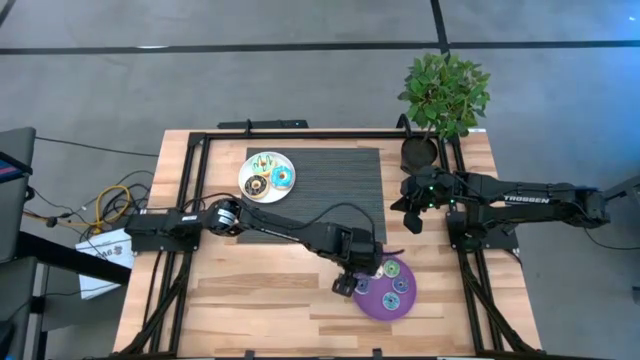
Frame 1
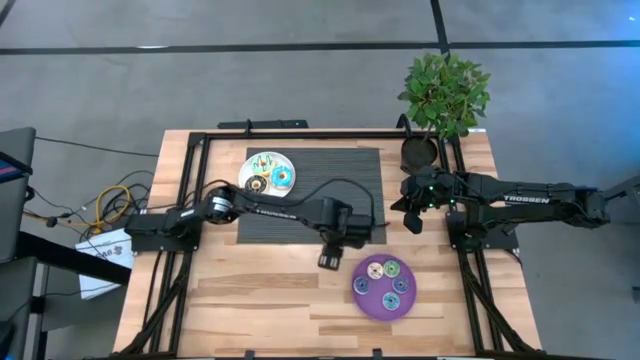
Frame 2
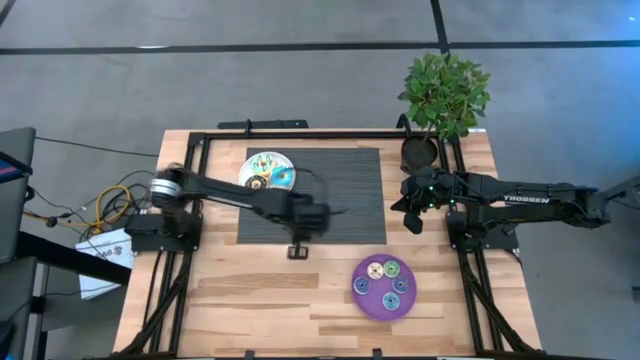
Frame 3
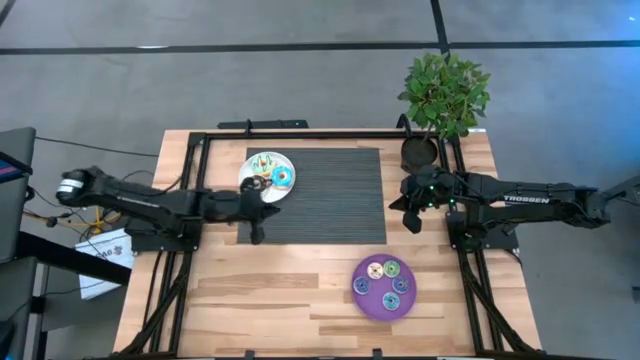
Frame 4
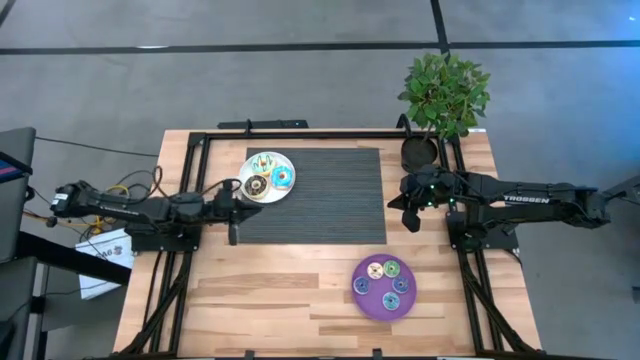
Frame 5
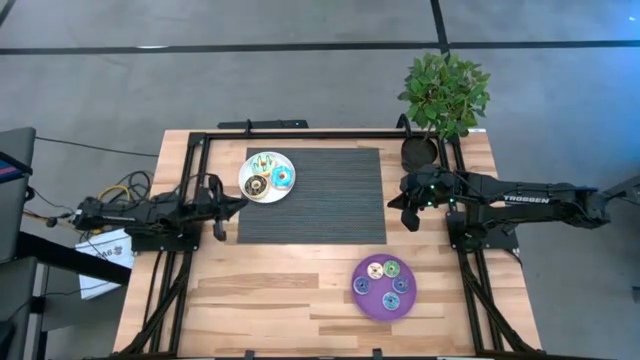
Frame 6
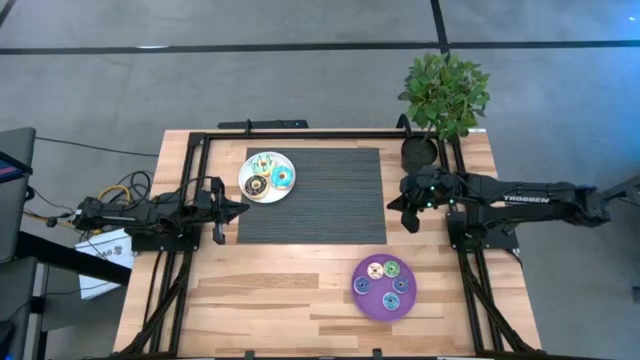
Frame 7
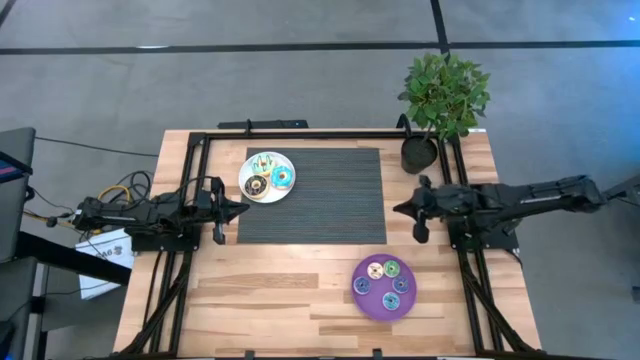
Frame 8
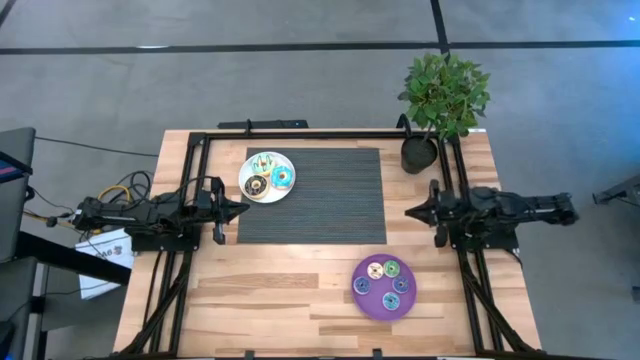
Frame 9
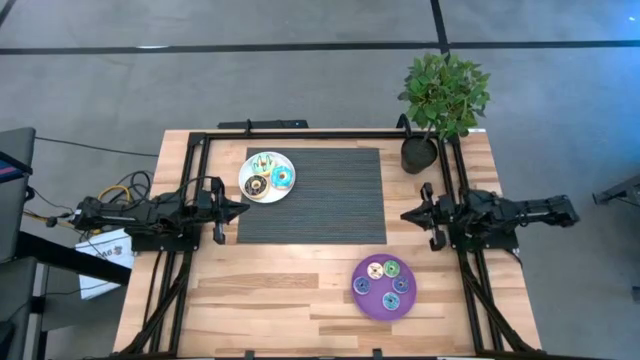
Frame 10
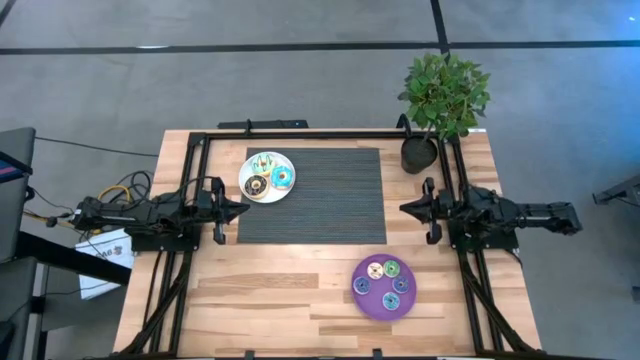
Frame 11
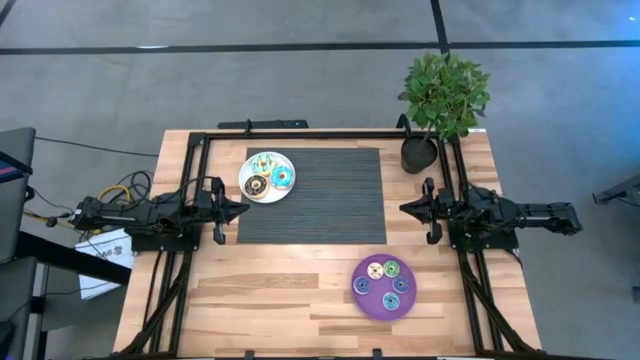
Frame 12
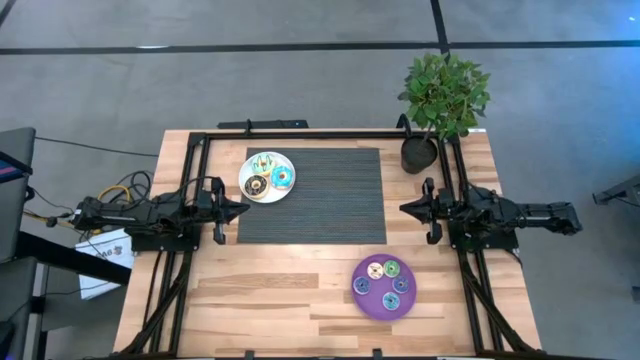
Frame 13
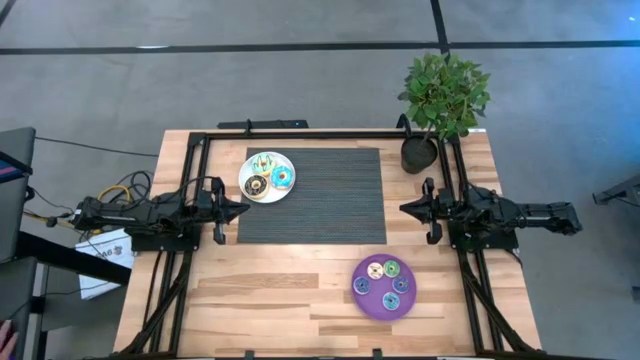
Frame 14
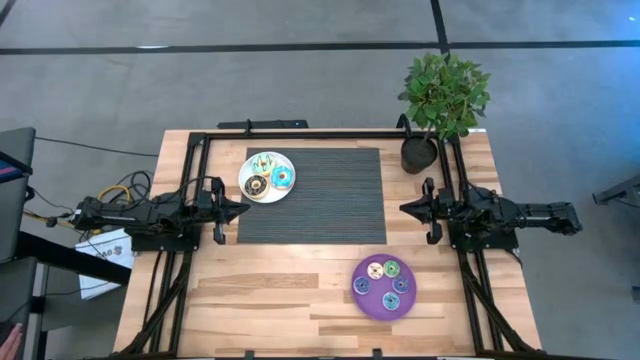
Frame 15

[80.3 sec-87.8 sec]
Task: Pick & Place donuts
Return to Home Position

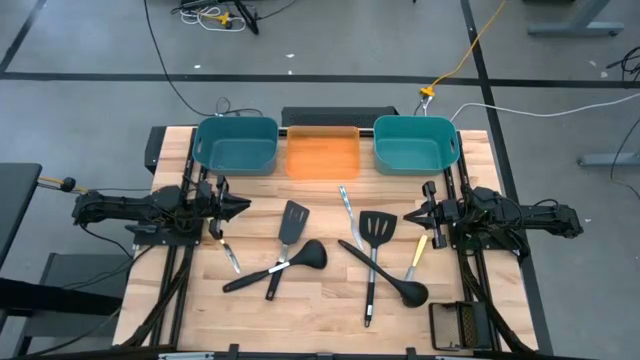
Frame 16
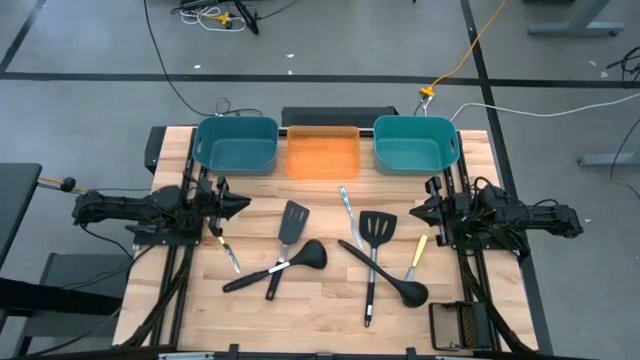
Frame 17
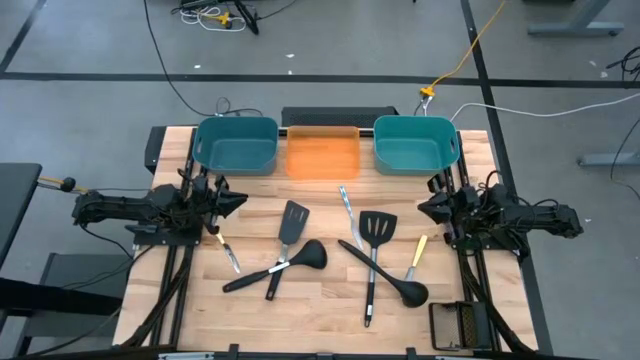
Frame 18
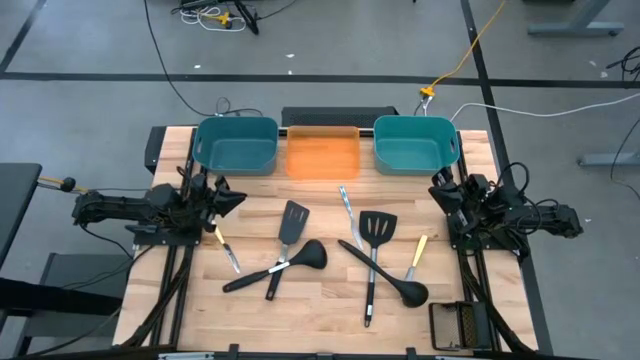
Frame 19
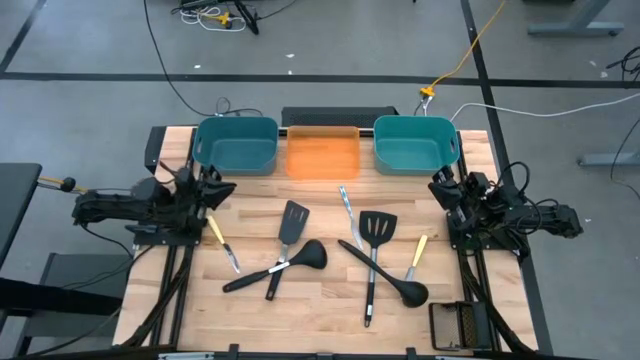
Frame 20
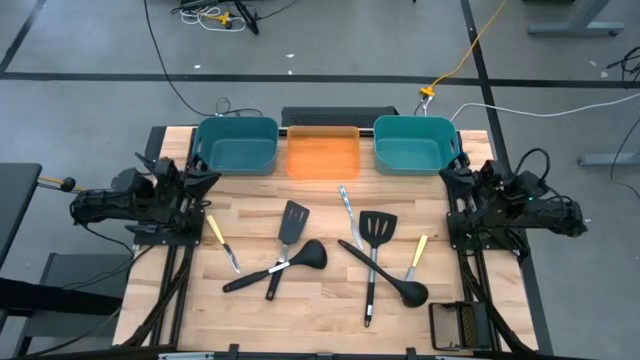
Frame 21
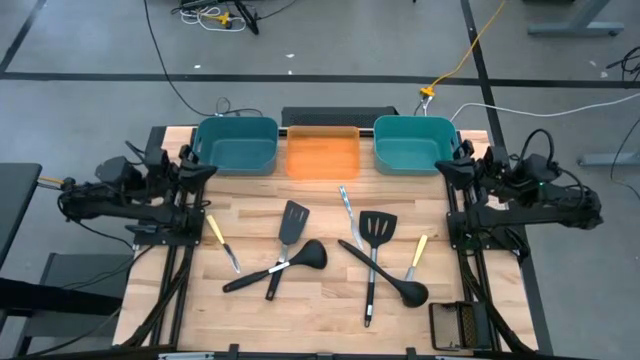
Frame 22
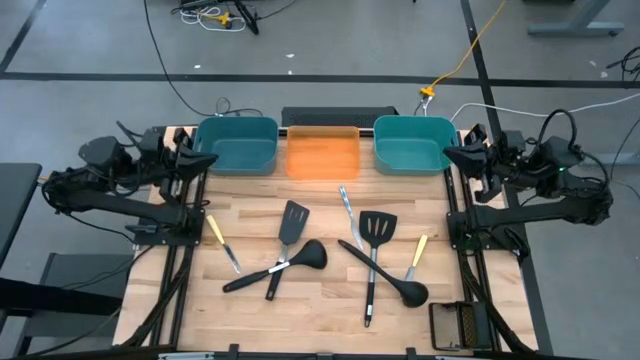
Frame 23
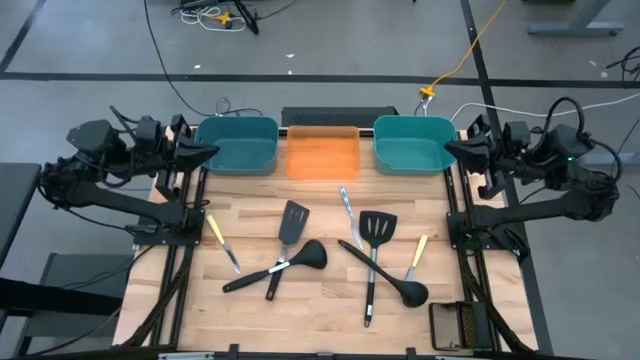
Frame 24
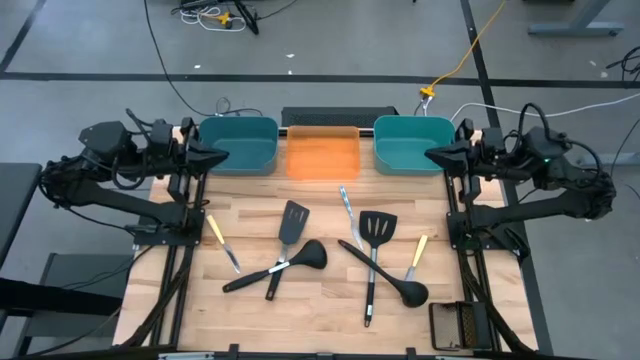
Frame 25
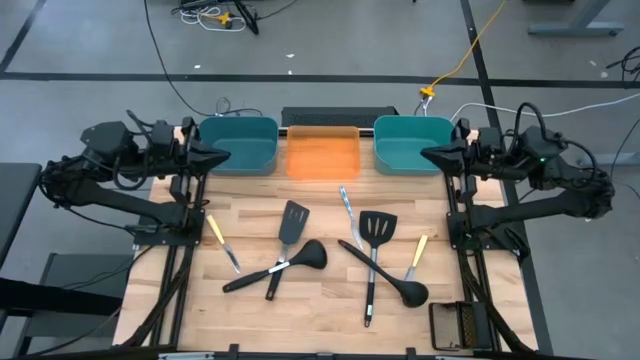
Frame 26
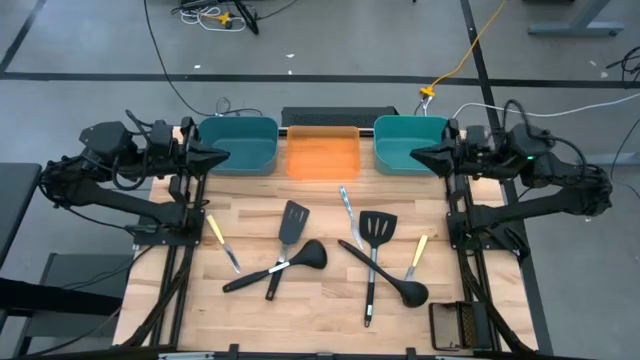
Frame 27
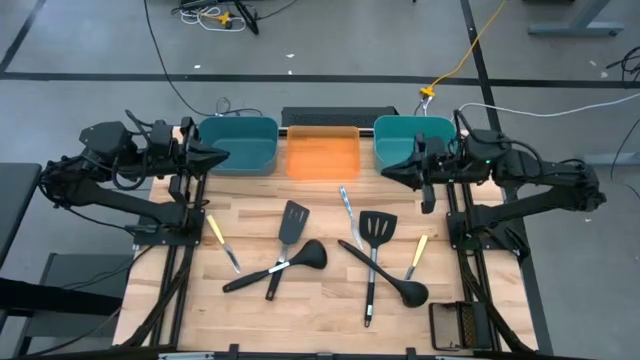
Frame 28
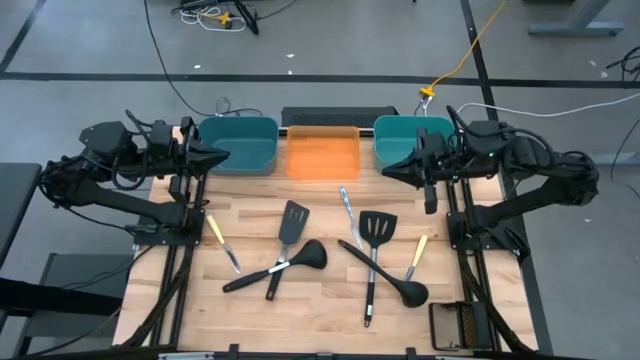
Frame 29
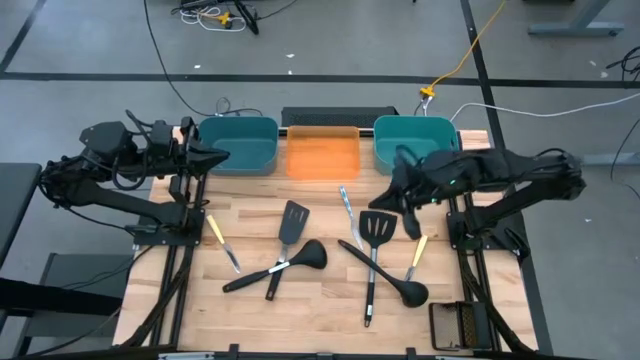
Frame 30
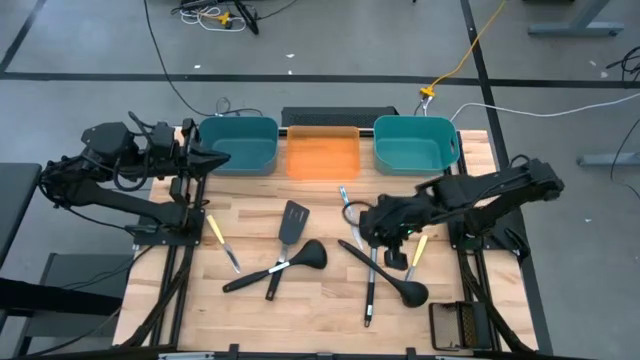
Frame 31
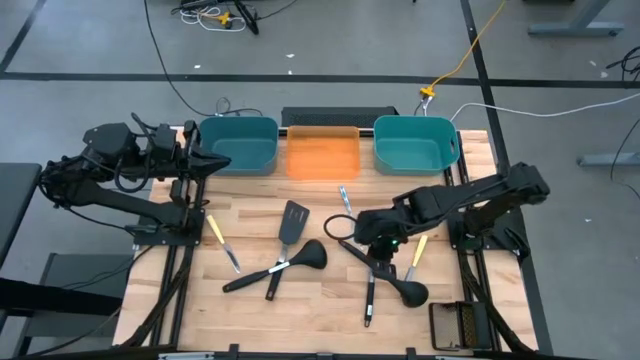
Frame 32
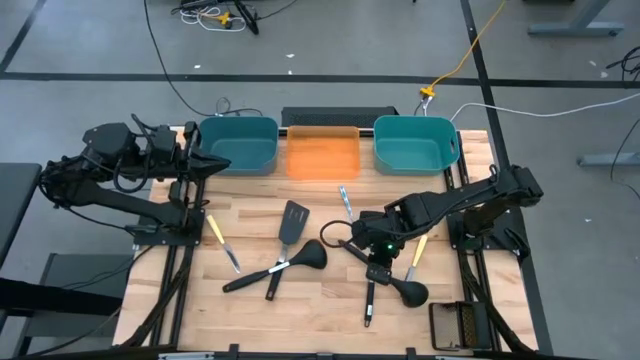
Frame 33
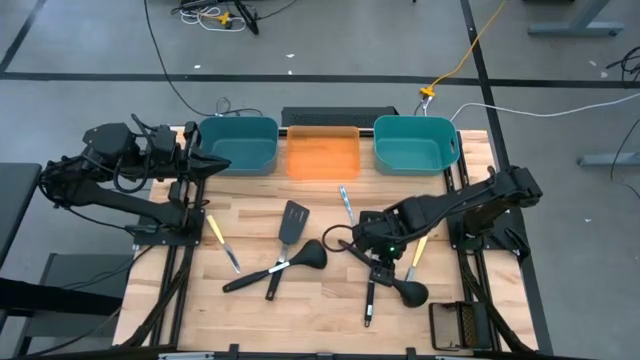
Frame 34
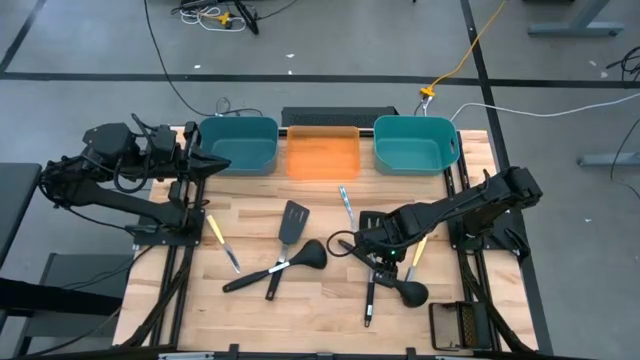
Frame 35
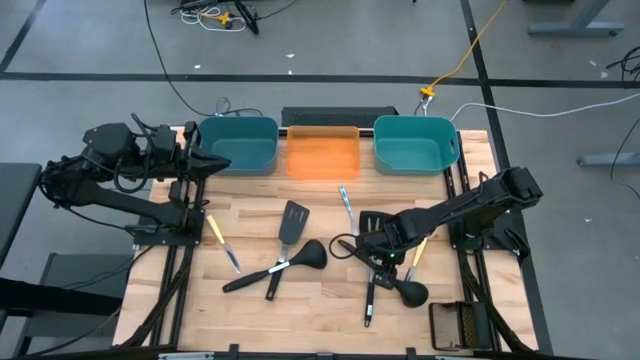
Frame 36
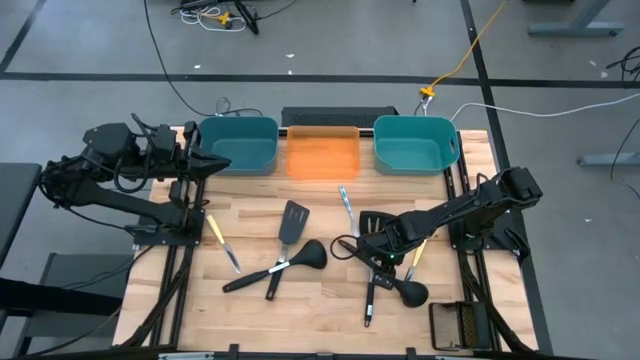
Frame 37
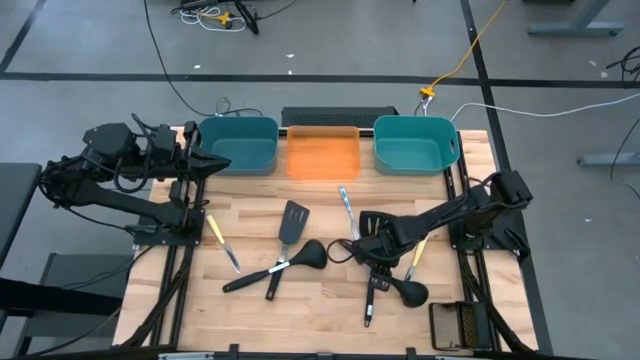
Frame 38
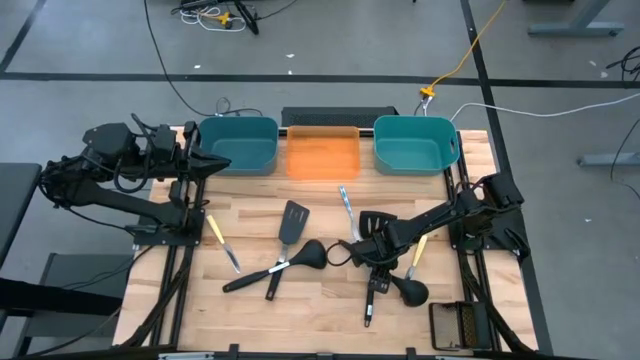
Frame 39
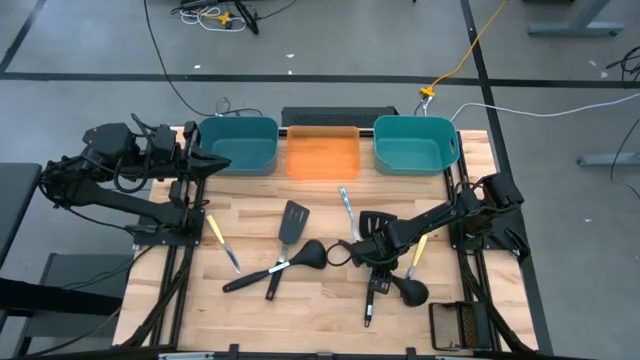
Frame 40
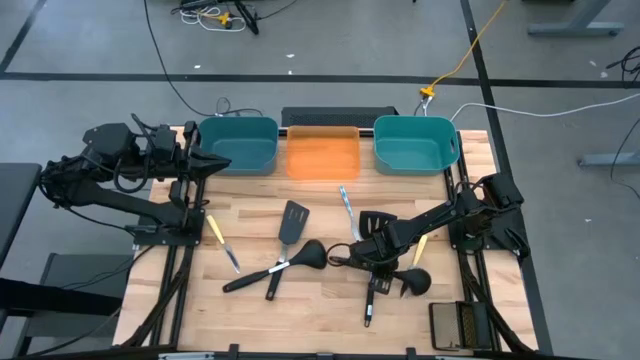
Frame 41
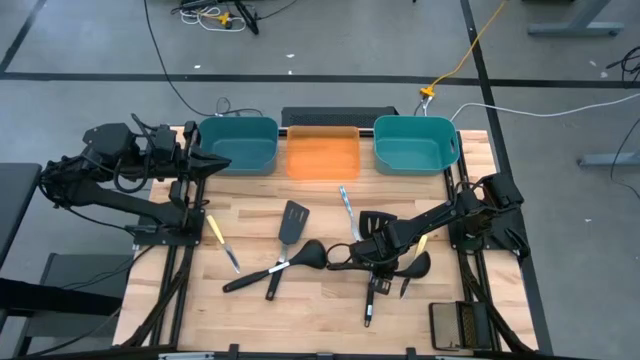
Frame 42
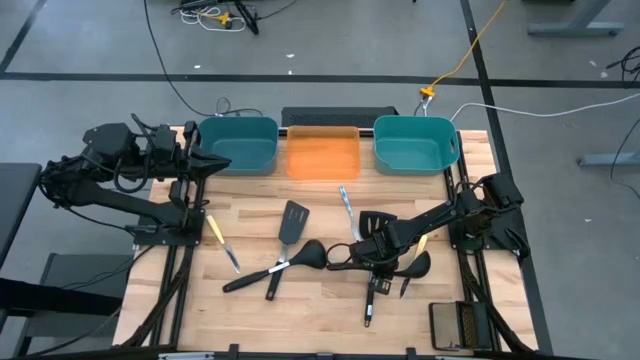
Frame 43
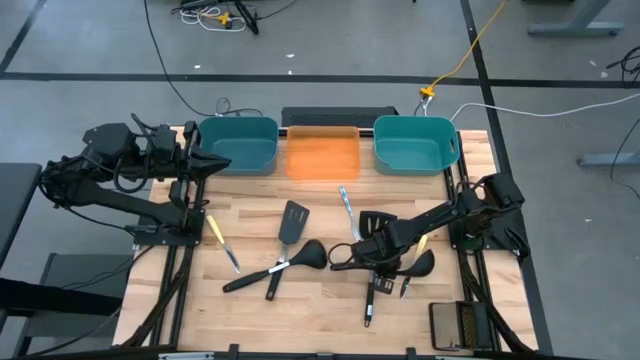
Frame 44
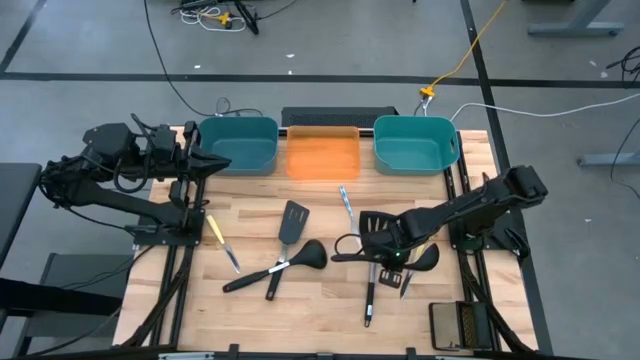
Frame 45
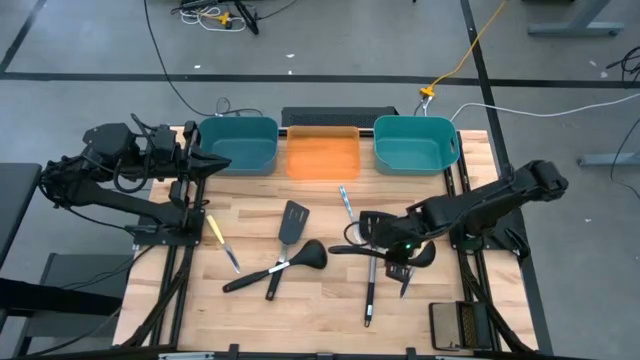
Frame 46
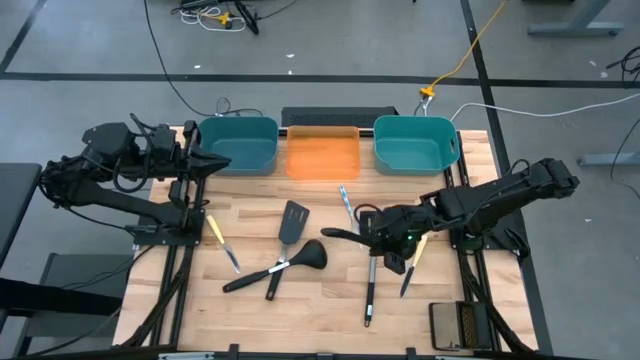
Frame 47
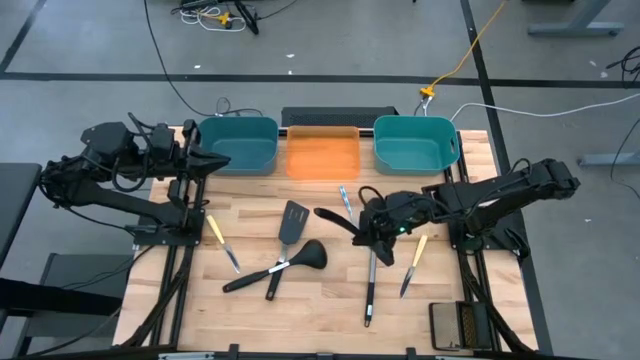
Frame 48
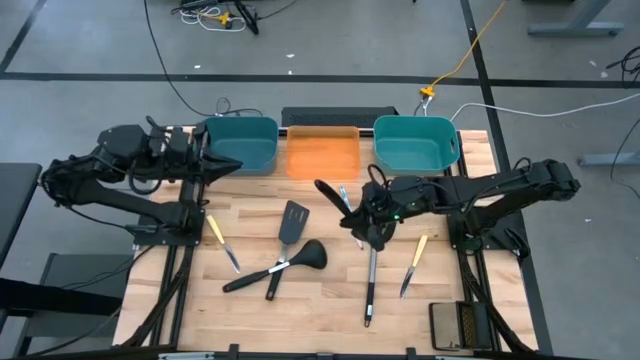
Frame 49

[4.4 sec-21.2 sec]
Task: Pick & Place Kitchen Items
Put the black ladle into the blue bin
